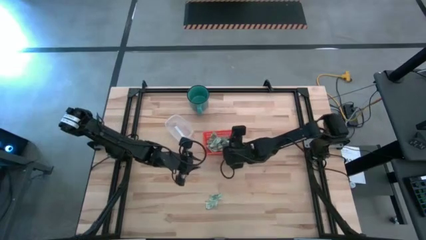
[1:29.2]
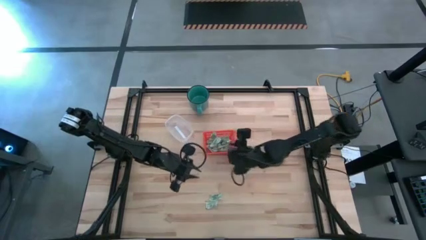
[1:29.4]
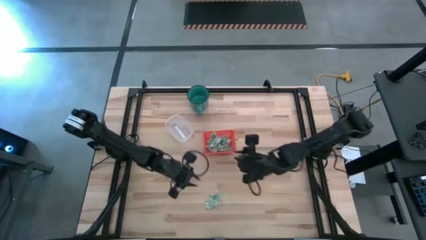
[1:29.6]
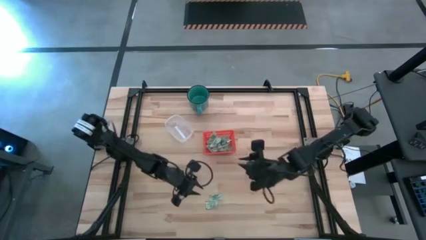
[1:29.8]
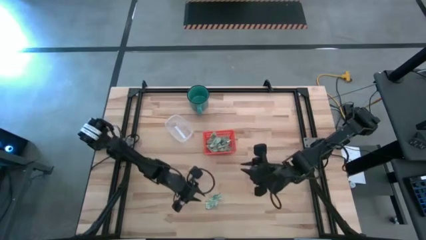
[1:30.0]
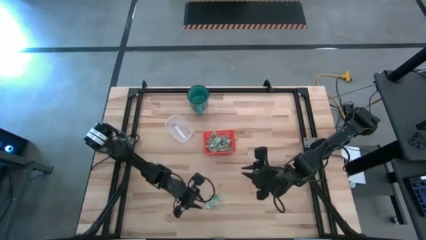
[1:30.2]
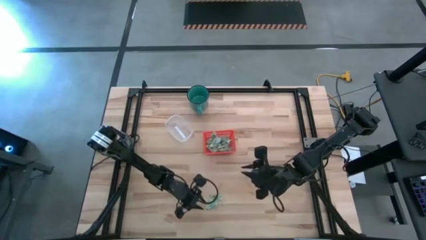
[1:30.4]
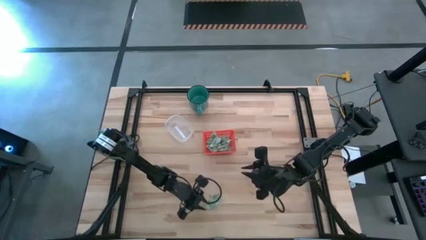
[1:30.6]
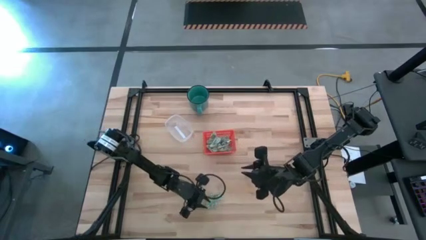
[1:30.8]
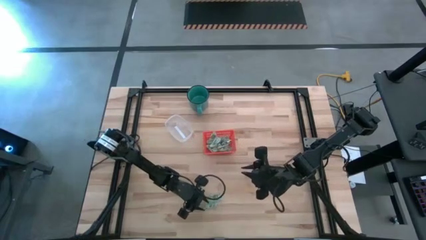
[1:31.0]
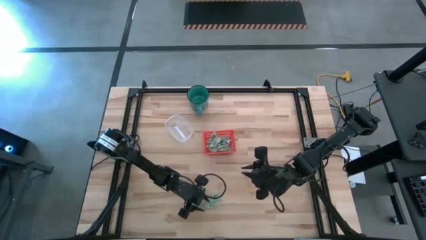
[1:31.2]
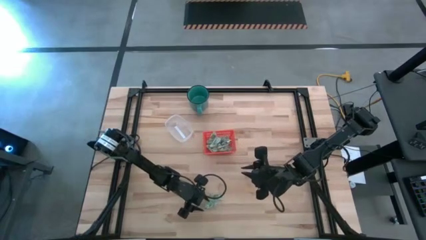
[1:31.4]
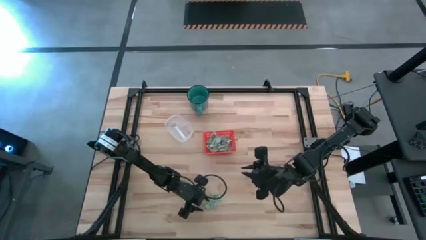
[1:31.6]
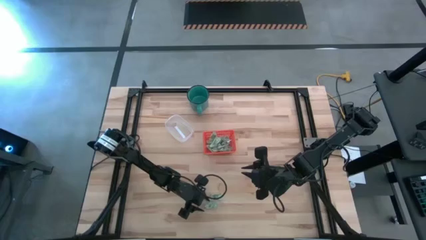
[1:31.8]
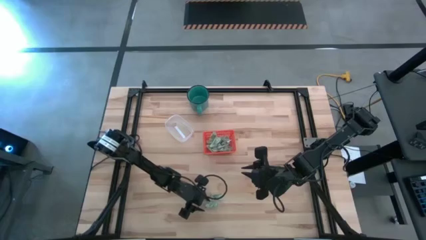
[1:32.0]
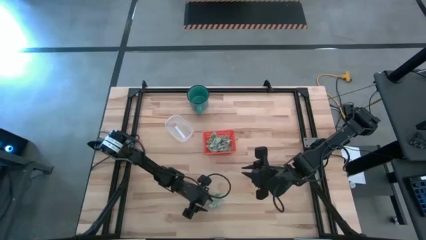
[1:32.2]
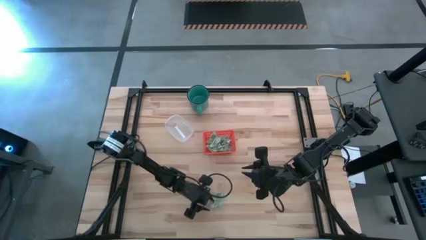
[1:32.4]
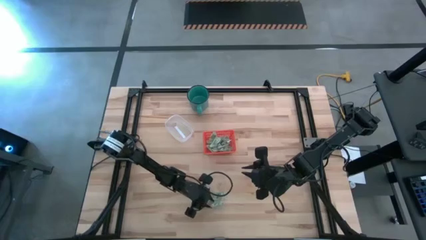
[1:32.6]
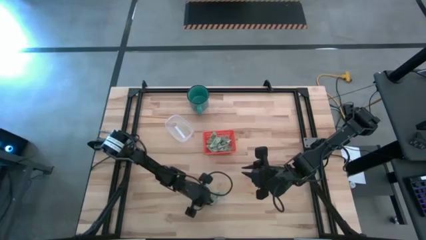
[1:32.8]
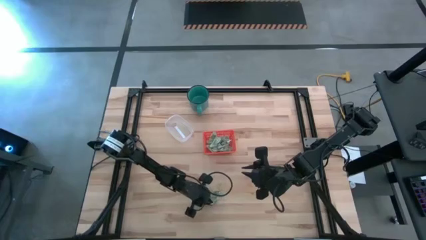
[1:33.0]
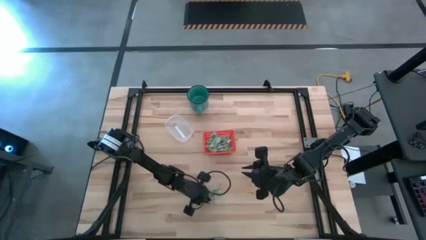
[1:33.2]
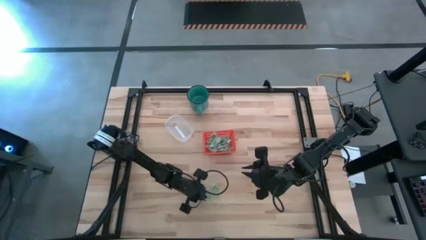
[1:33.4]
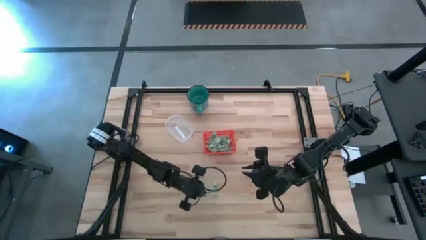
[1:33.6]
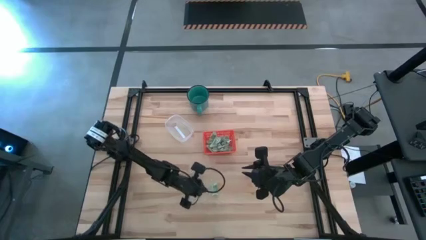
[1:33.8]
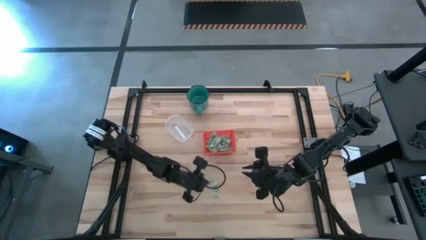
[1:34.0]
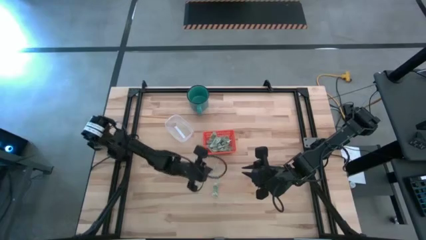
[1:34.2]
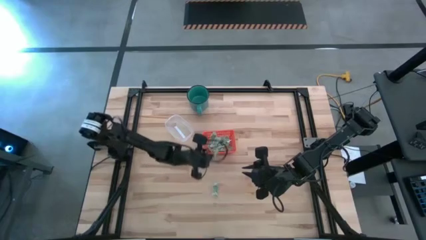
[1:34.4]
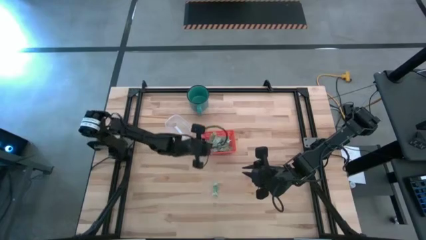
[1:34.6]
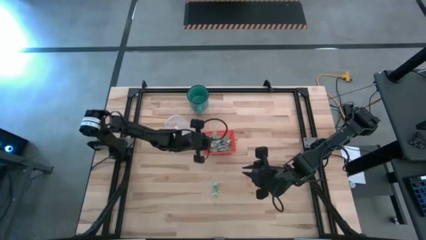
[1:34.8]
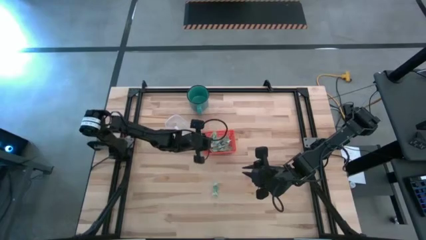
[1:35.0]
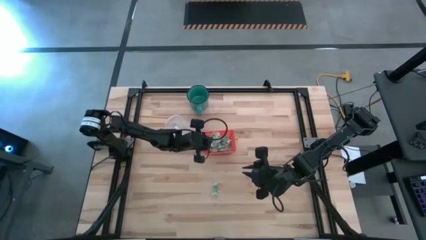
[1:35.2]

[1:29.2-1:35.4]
Task: Pick and place items into bin
Put the stevia packet into the orange bin

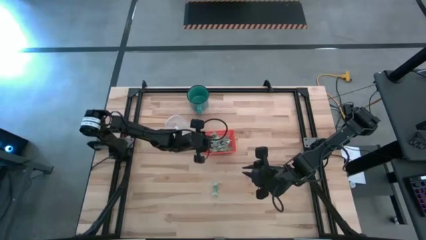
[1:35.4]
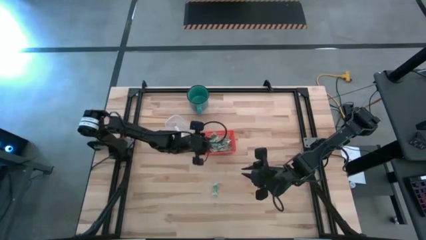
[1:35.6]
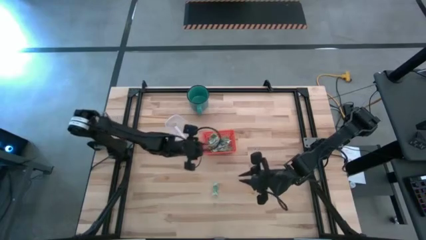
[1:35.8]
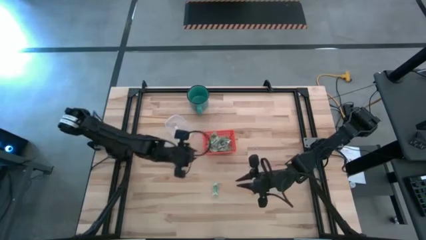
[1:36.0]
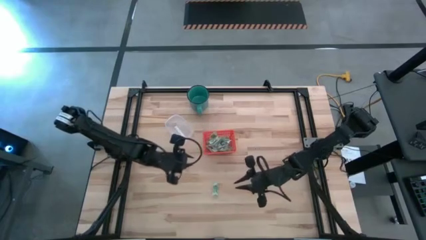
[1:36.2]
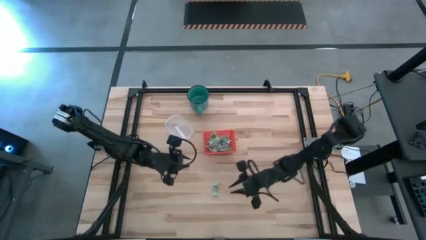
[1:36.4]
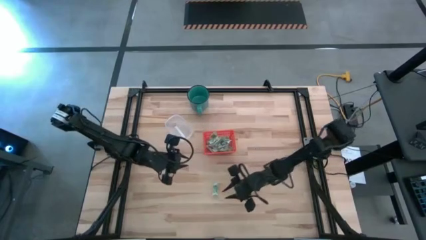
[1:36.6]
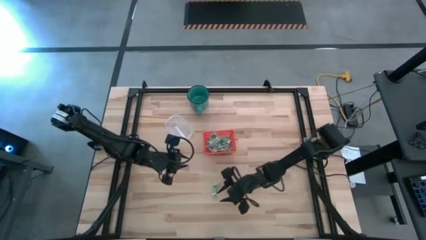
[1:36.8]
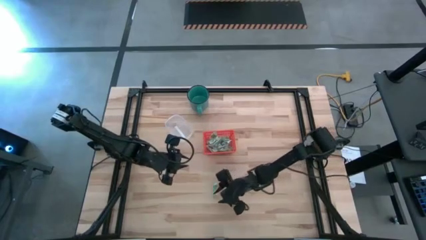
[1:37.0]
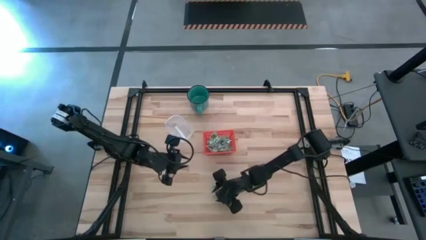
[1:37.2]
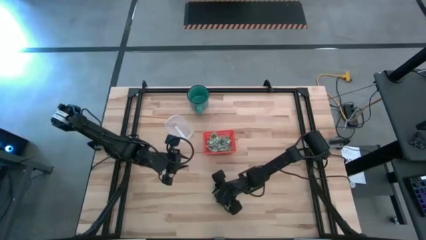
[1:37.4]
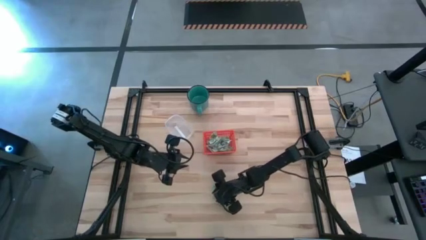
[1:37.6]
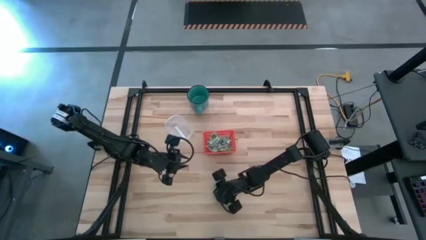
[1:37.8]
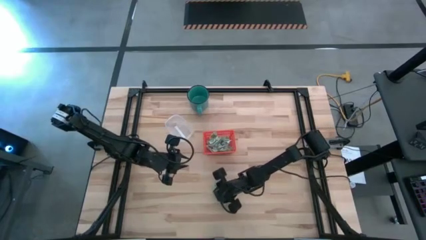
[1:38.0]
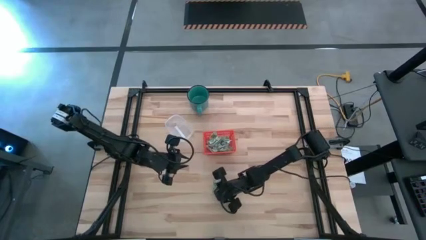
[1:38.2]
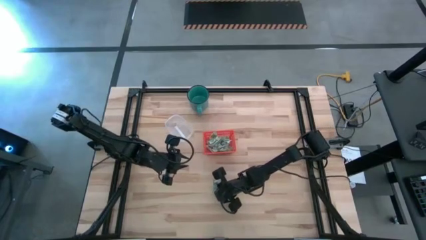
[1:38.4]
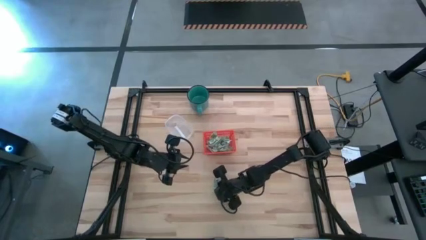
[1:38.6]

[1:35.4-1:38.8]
Put the stevia packet into the orange bin

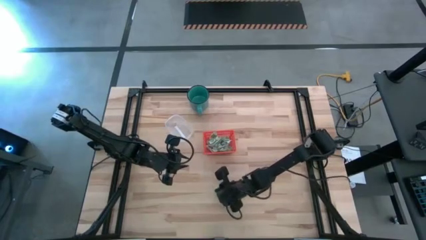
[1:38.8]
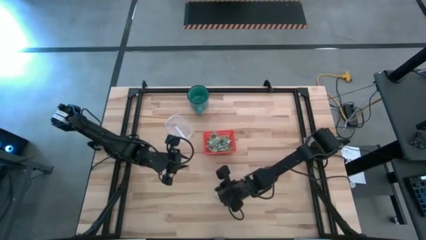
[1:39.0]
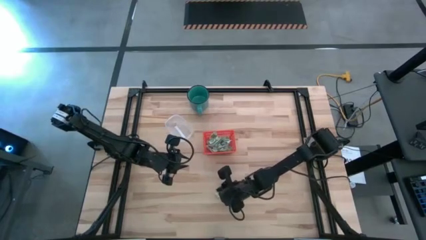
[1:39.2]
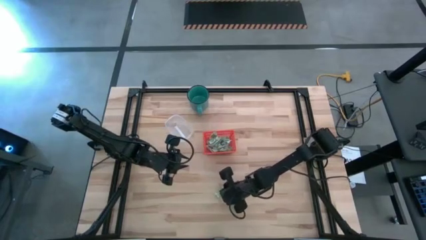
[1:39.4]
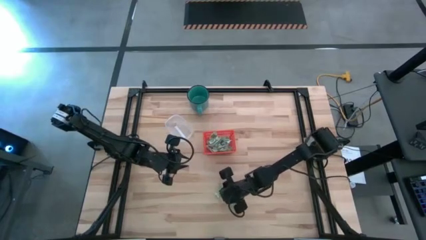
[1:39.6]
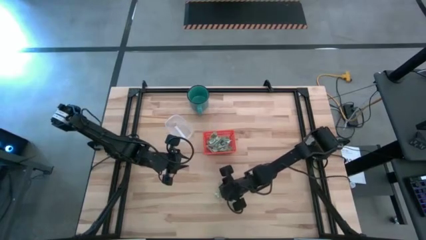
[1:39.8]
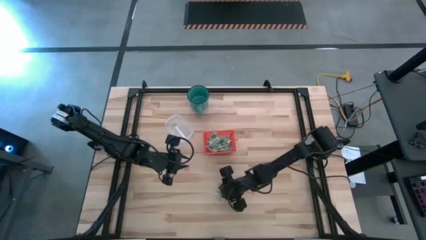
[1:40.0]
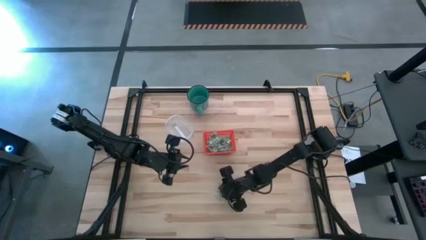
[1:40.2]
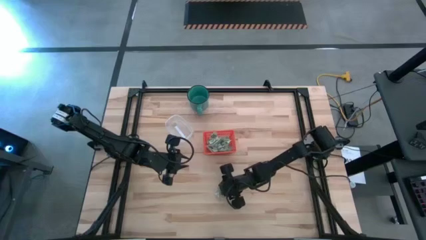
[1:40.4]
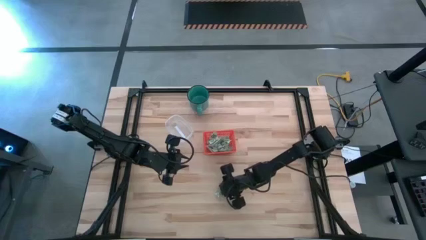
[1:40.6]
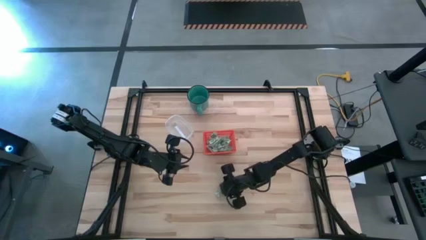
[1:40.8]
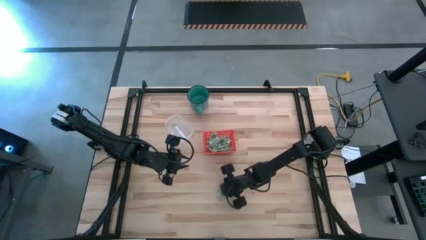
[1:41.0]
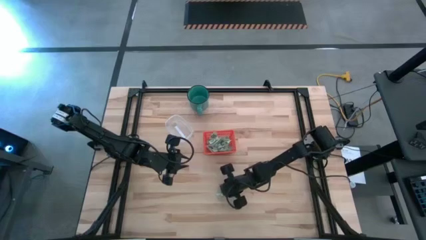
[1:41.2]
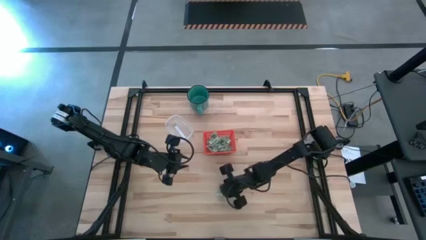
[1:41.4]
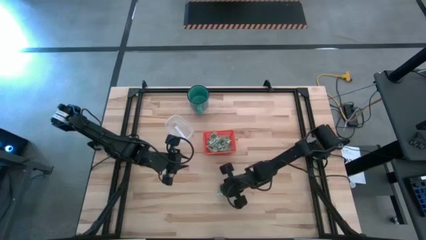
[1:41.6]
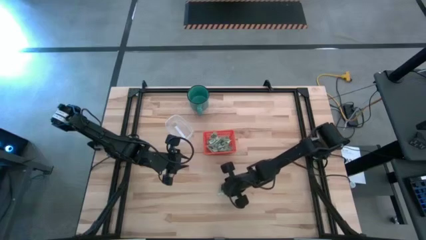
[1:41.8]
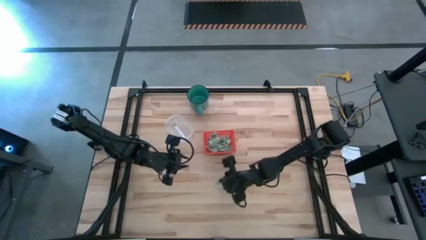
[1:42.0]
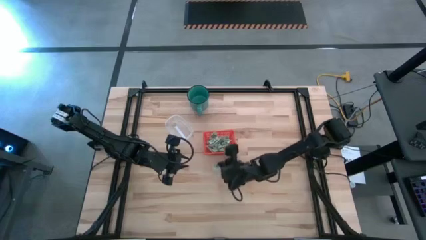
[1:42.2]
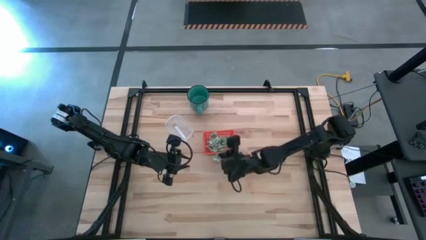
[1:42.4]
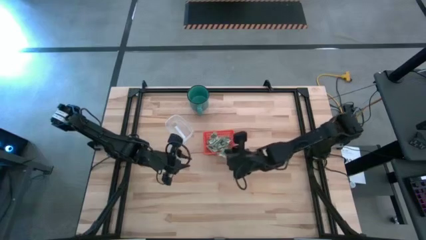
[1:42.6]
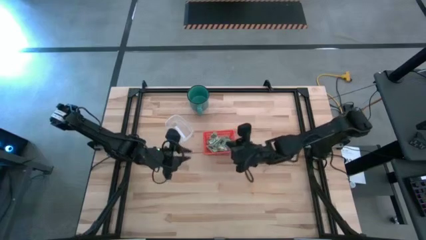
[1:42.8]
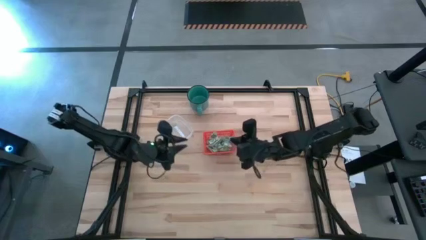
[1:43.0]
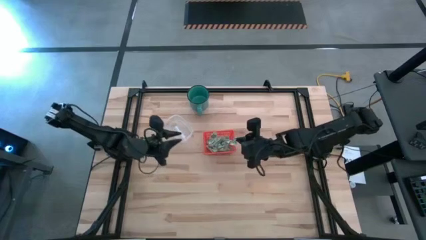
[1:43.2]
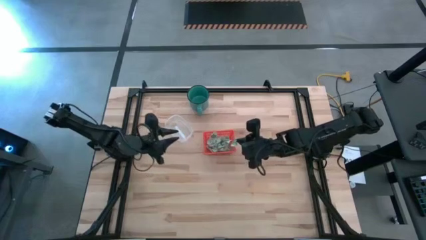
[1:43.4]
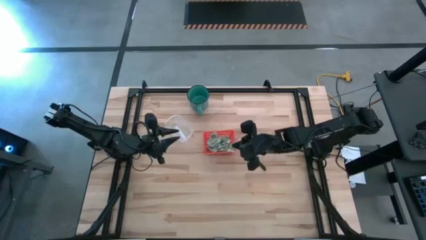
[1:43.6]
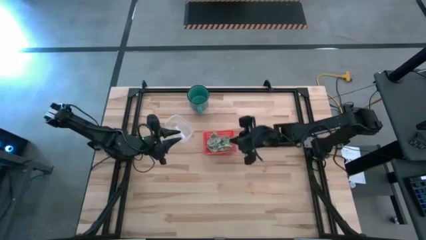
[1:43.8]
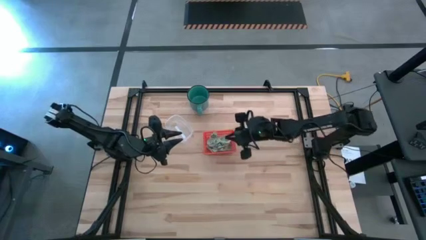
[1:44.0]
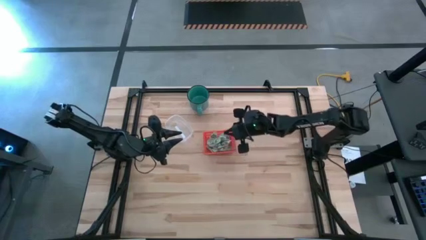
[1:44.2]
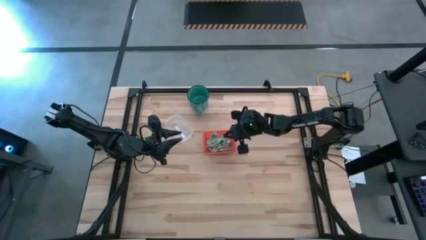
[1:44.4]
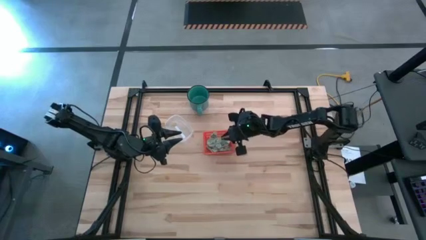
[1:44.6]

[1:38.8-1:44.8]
Put the stevia packet into the orange bin
